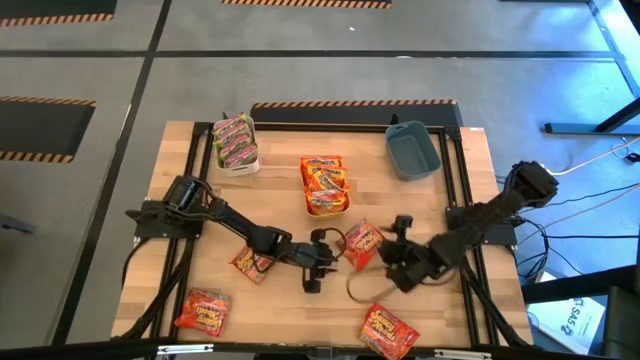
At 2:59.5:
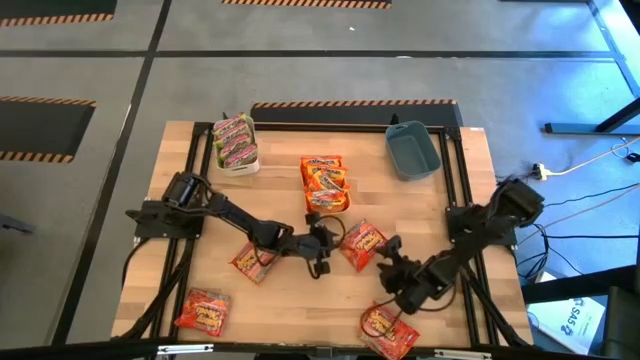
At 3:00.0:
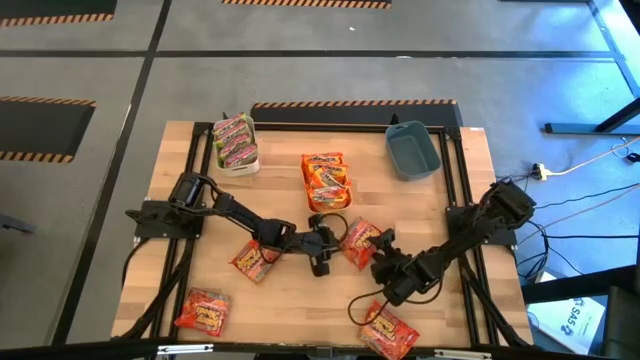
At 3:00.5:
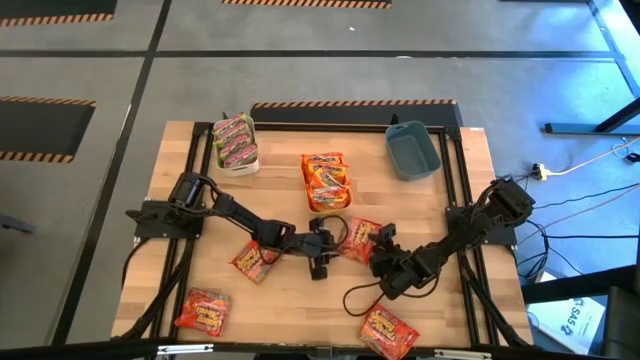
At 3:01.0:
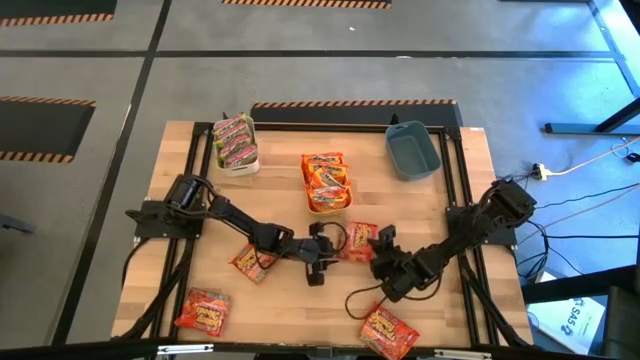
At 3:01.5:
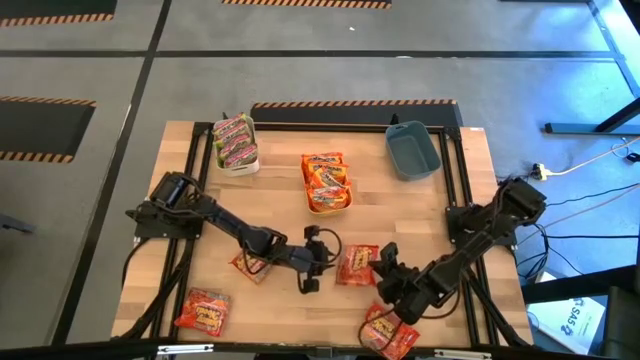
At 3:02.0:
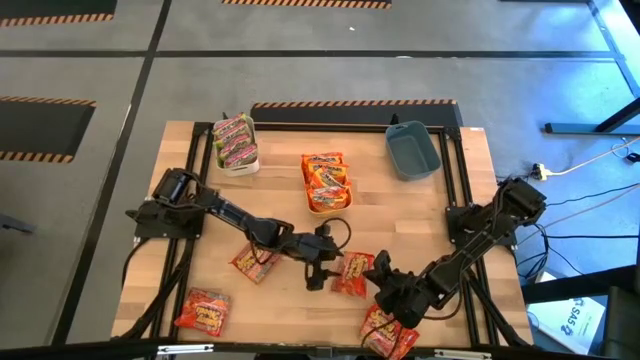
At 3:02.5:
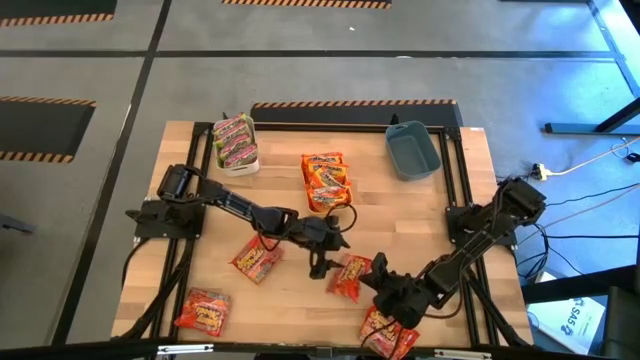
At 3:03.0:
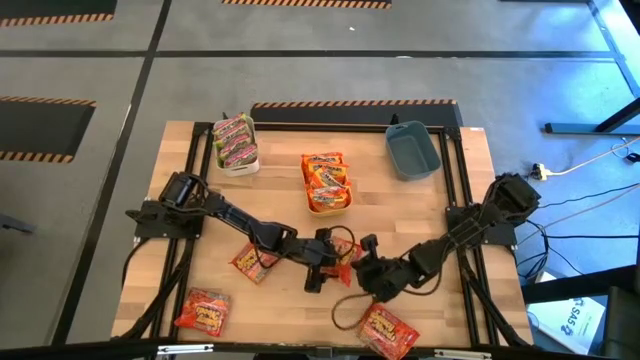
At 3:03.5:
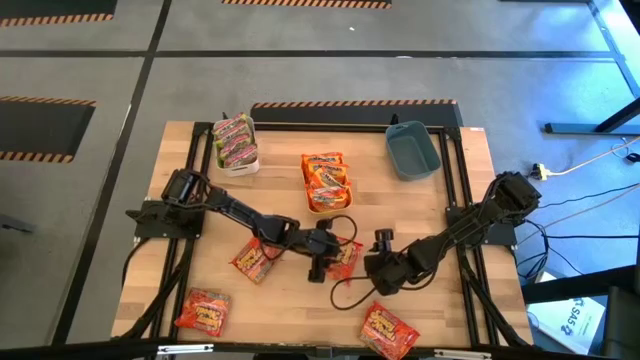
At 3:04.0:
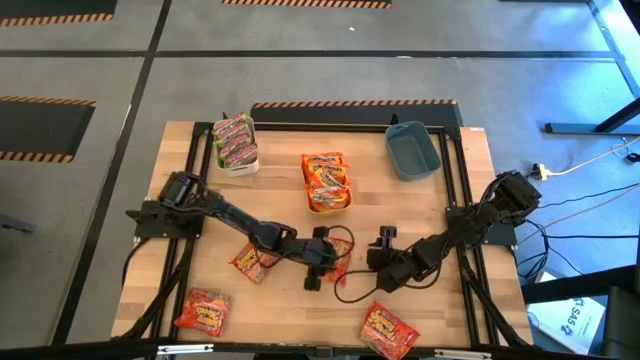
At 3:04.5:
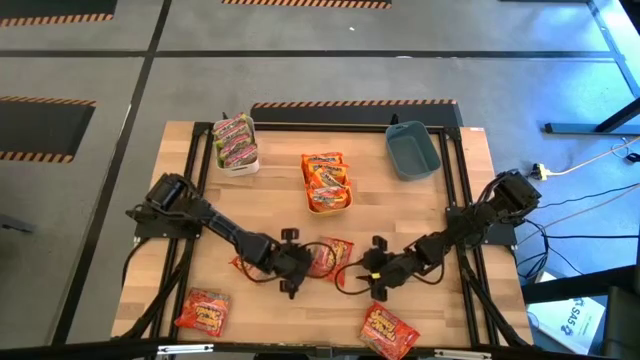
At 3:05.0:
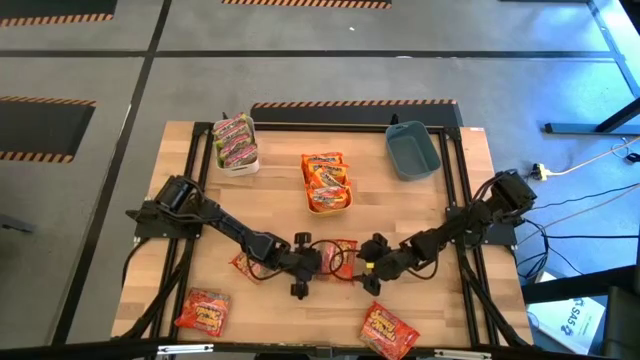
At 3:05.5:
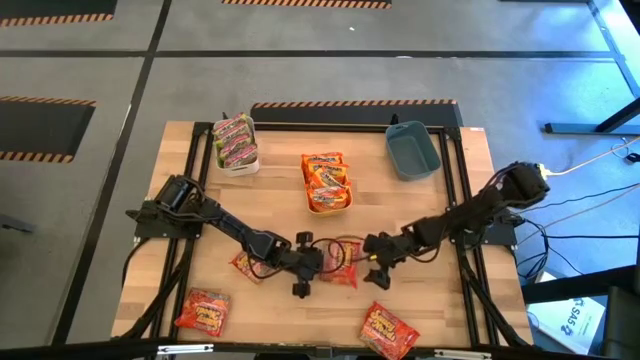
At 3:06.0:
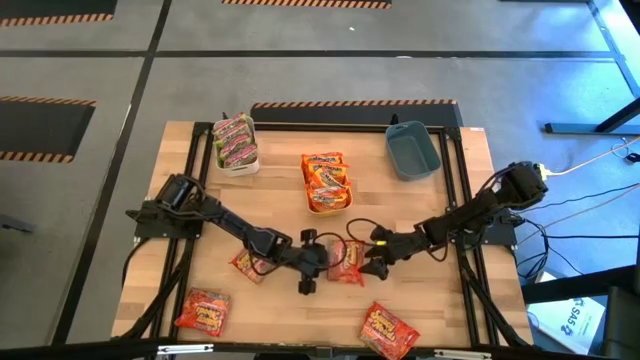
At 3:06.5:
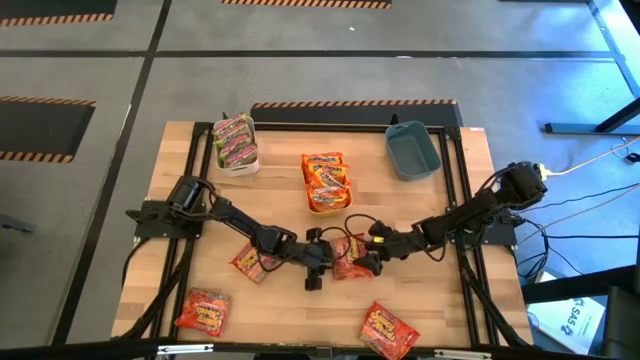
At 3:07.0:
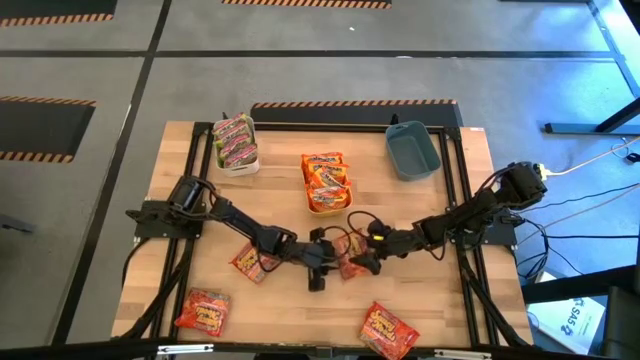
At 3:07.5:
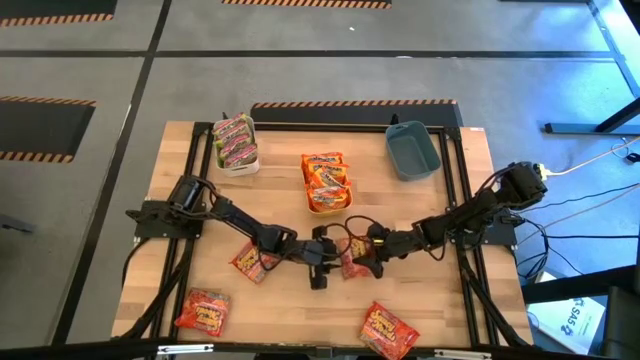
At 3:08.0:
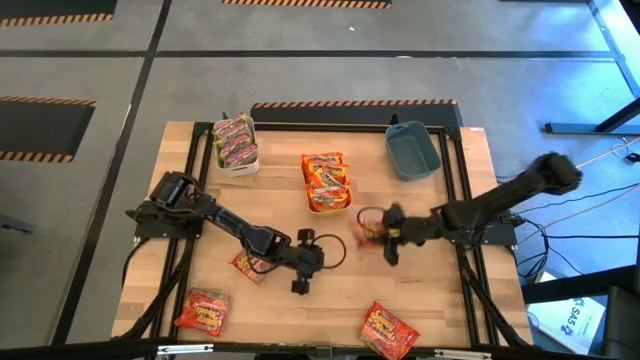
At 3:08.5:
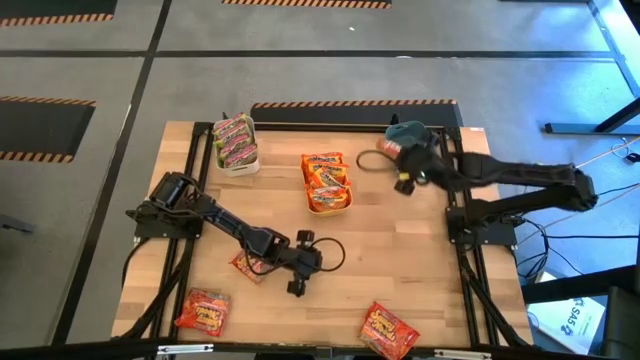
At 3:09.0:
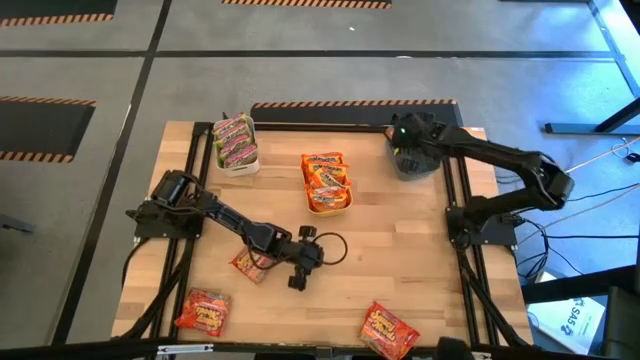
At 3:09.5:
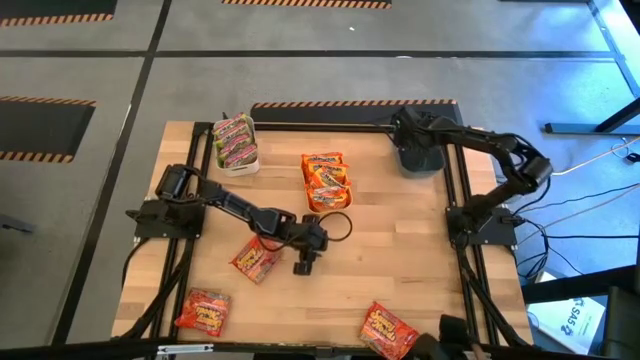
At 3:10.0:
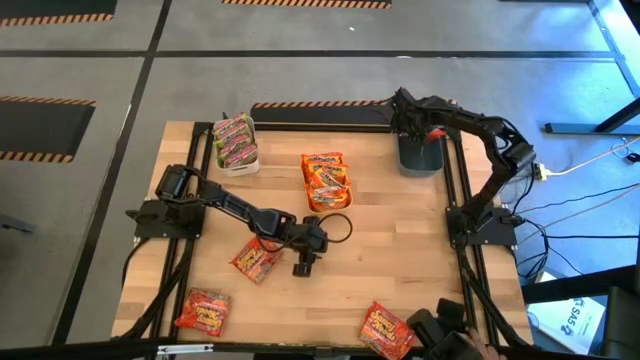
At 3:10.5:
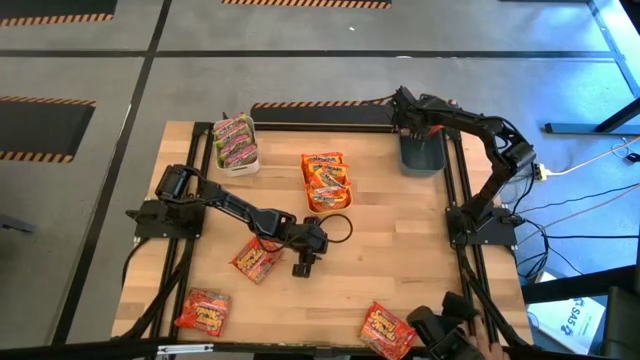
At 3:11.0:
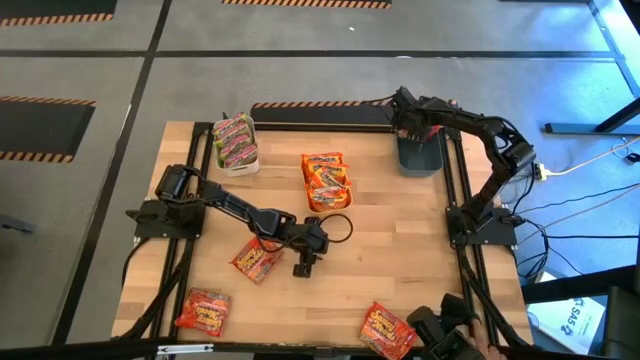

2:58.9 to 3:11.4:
Task: Sort Maruchan noodles
Put the top right red noodle pack into the green bin

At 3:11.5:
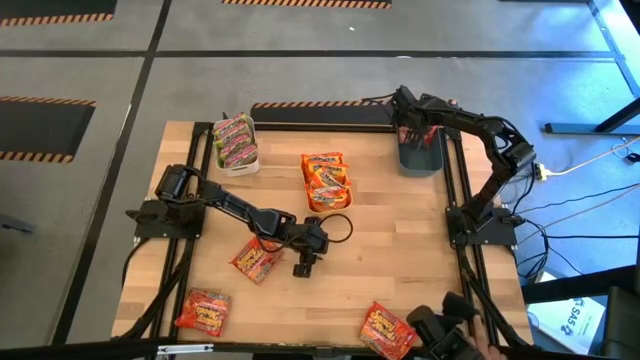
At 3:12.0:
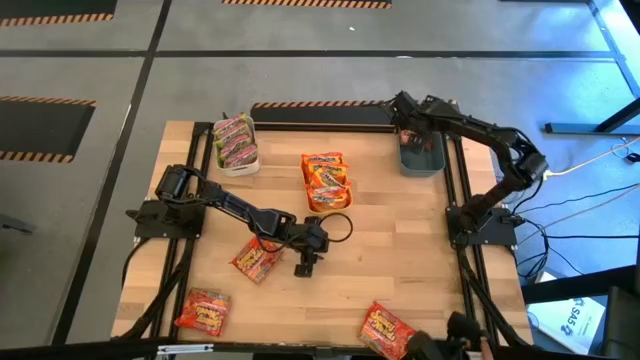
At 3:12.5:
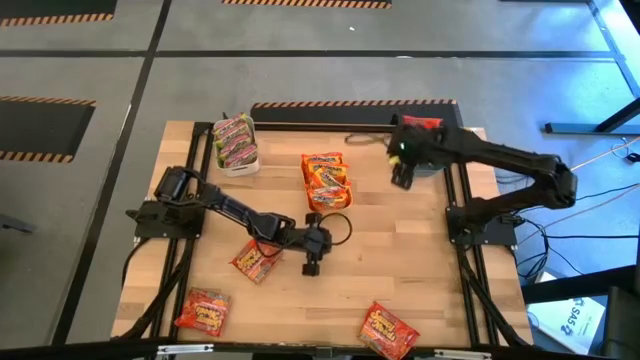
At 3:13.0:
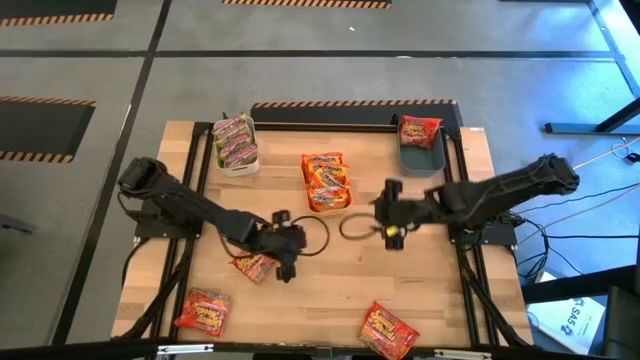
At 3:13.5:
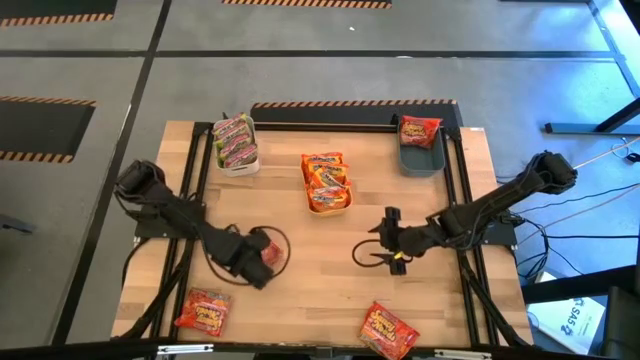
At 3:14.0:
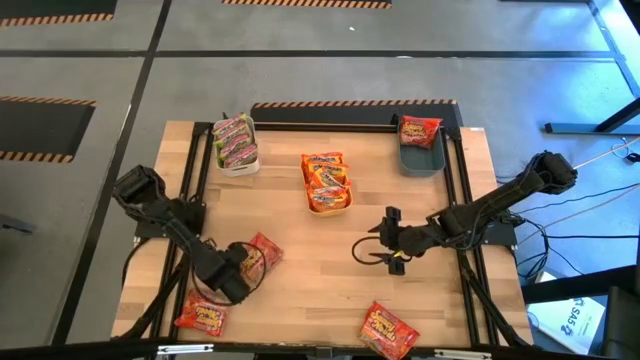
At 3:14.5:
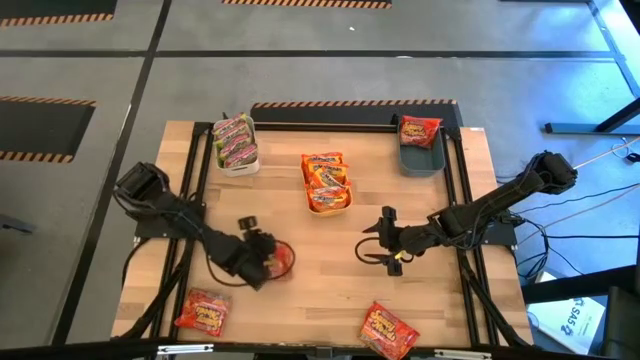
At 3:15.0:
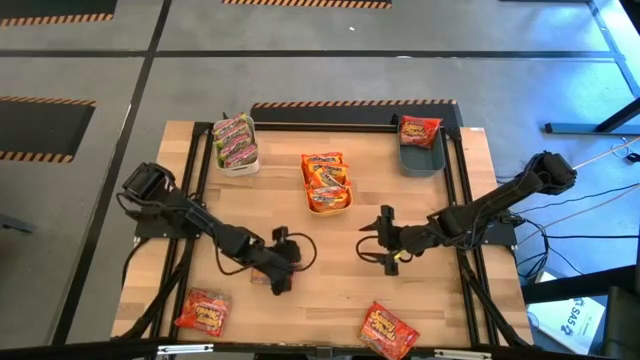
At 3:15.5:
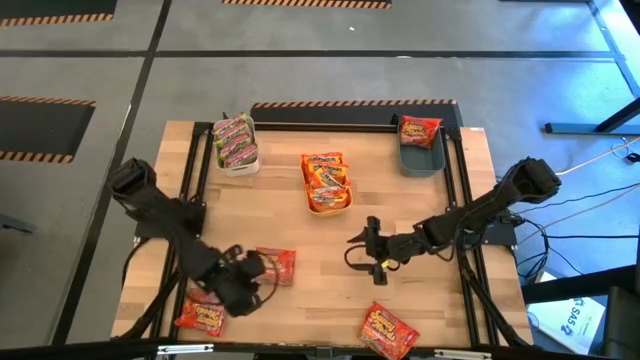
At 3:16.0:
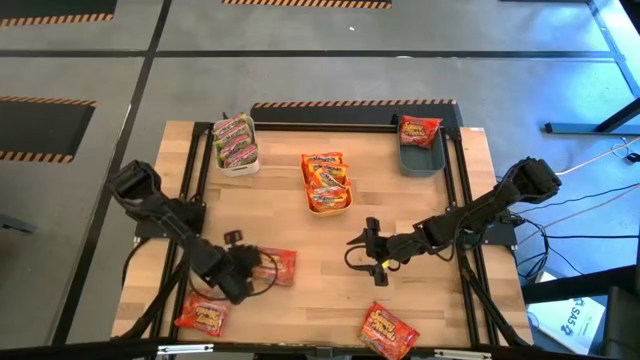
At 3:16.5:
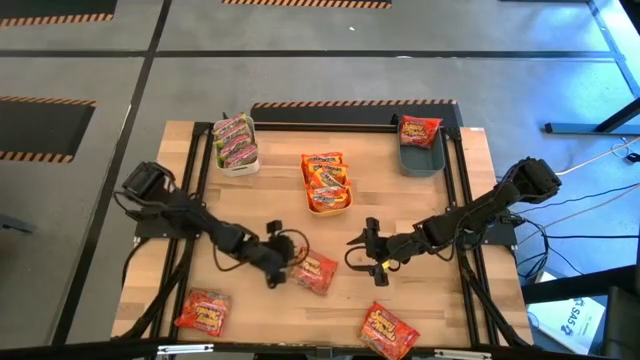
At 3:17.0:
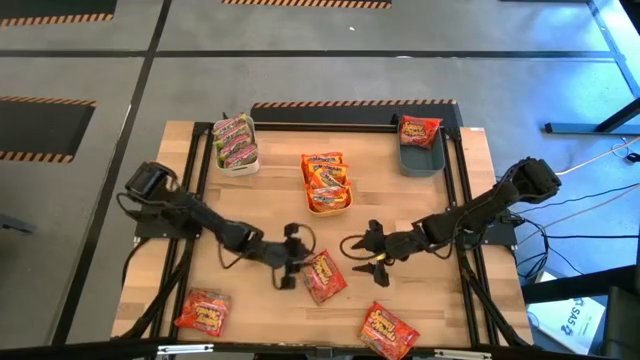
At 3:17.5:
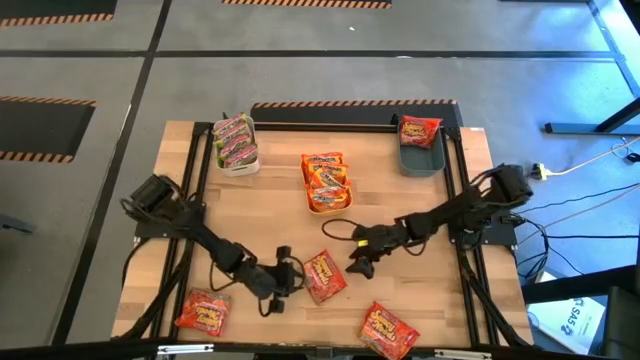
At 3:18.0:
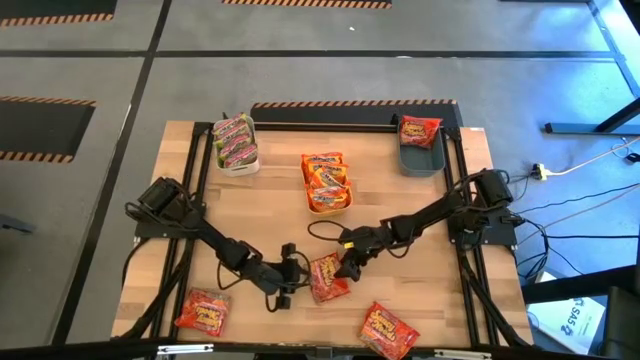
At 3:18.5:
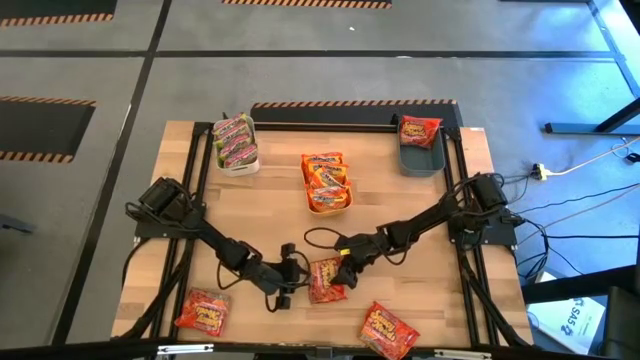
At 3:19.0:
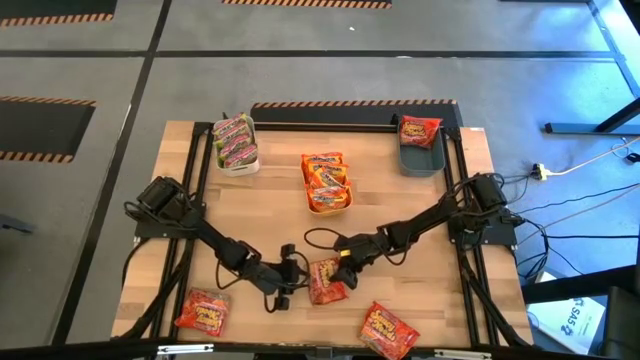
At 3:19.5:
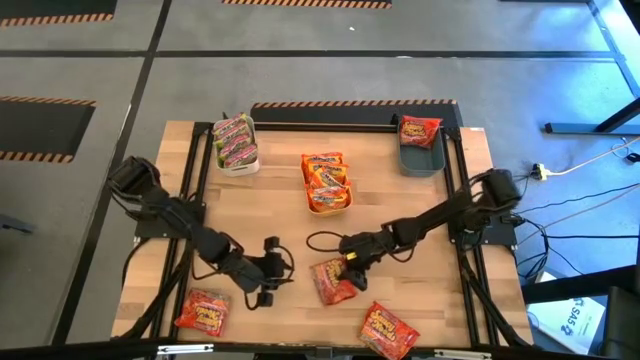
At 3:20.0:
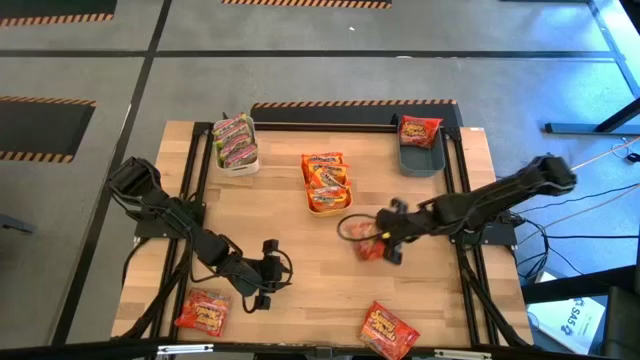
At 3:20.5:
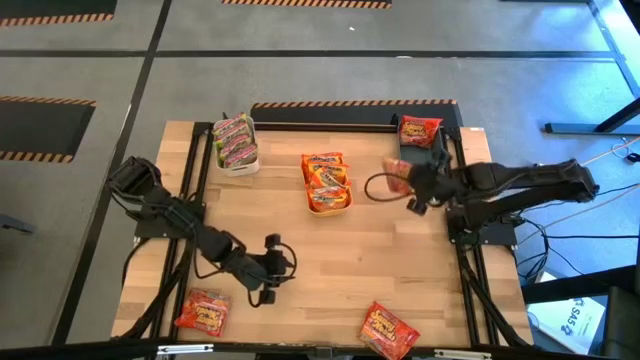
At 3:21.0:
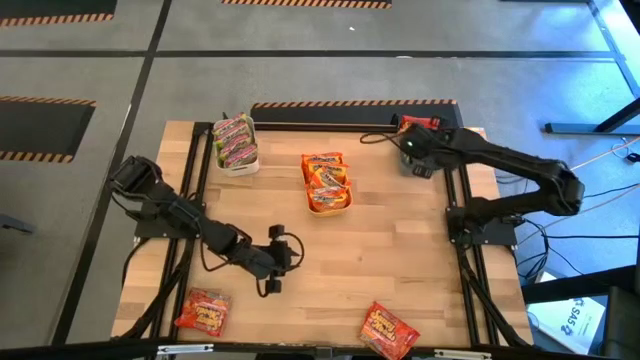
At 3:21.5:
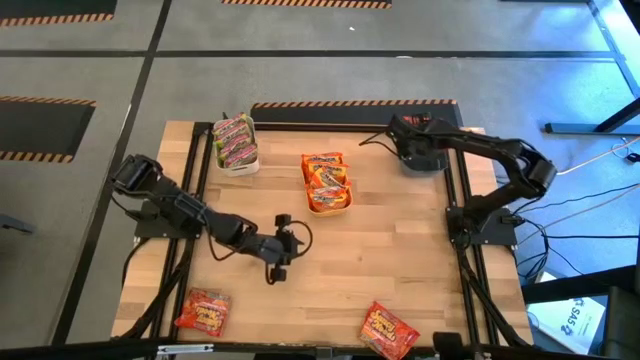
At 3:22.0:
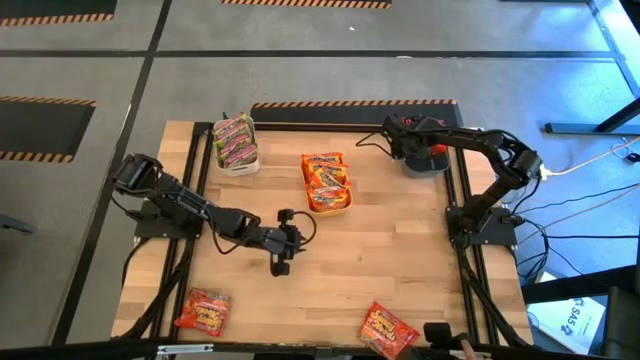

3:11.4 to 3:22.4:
Put the top red noodle pack into the green bin
